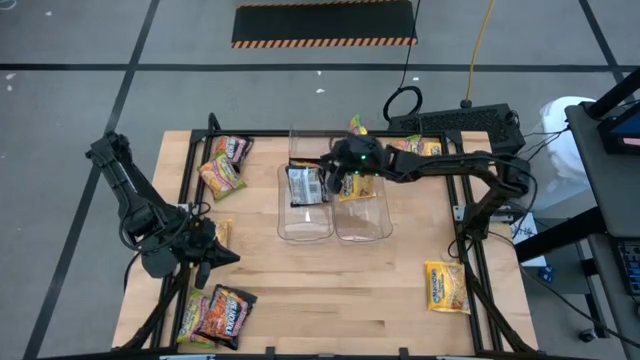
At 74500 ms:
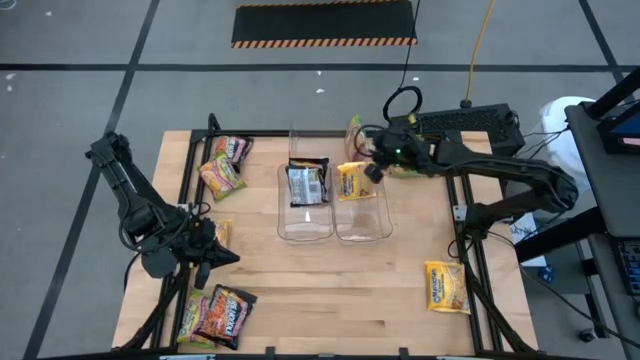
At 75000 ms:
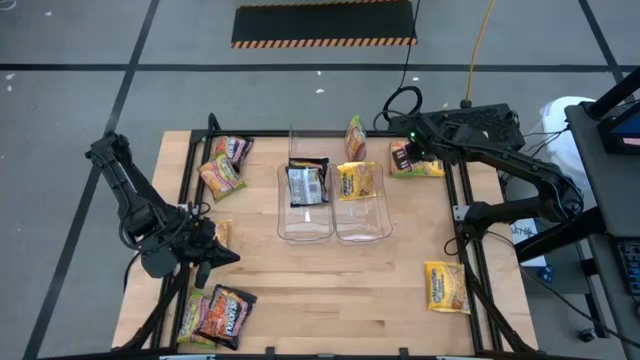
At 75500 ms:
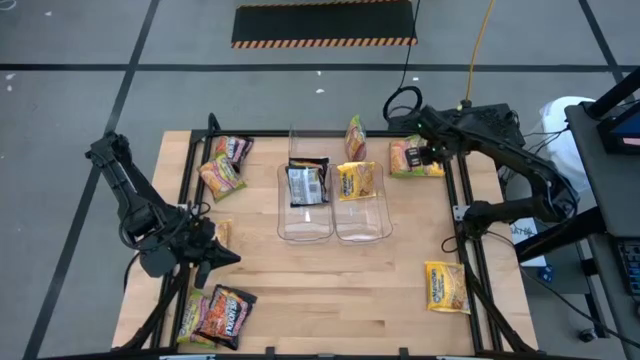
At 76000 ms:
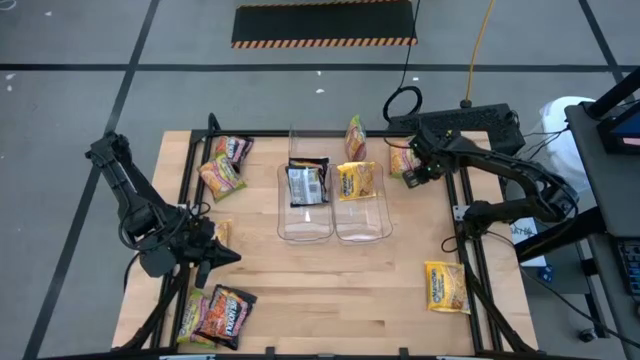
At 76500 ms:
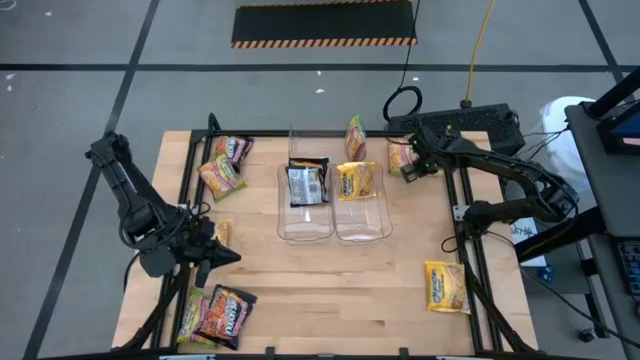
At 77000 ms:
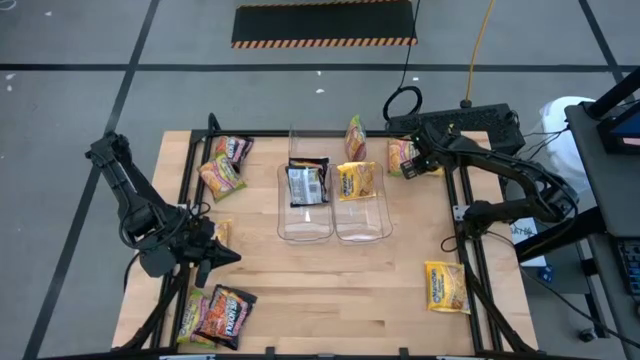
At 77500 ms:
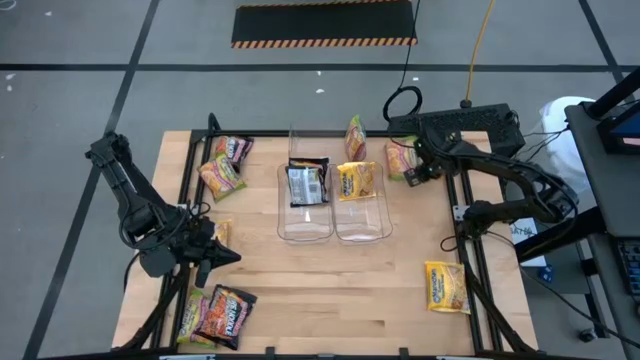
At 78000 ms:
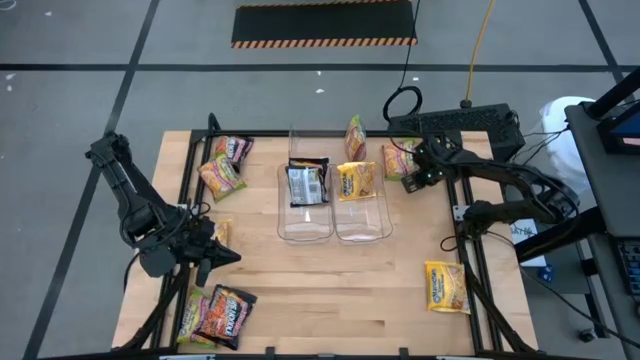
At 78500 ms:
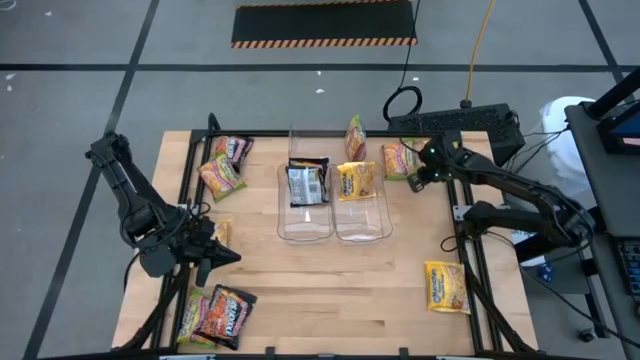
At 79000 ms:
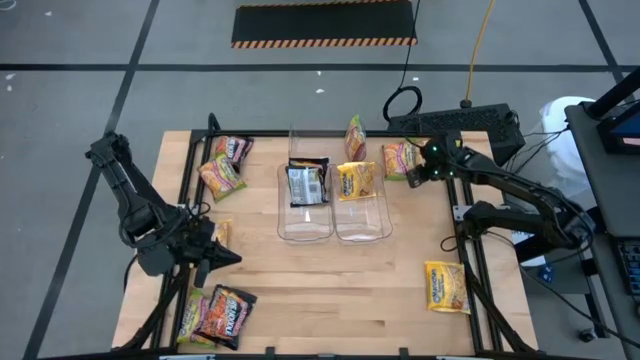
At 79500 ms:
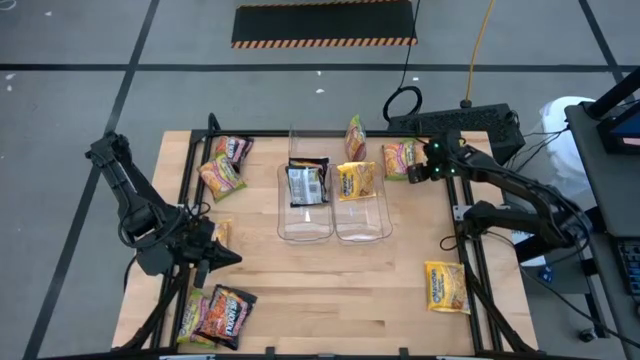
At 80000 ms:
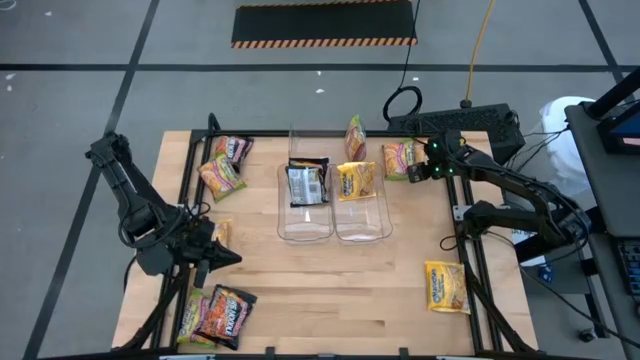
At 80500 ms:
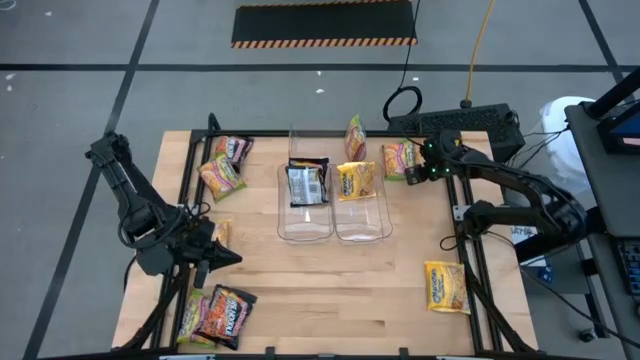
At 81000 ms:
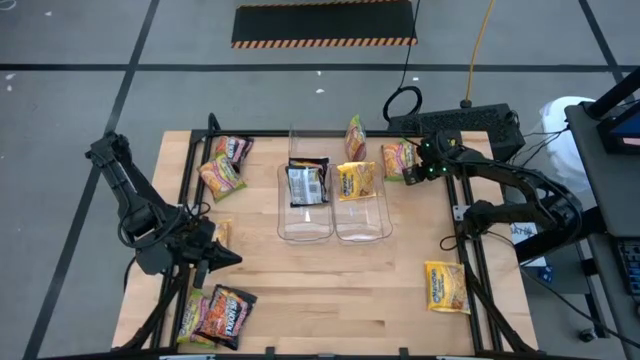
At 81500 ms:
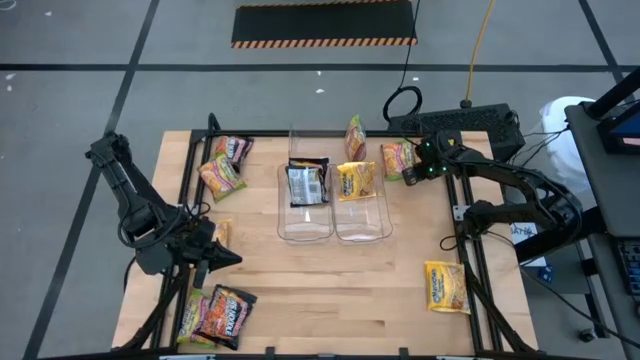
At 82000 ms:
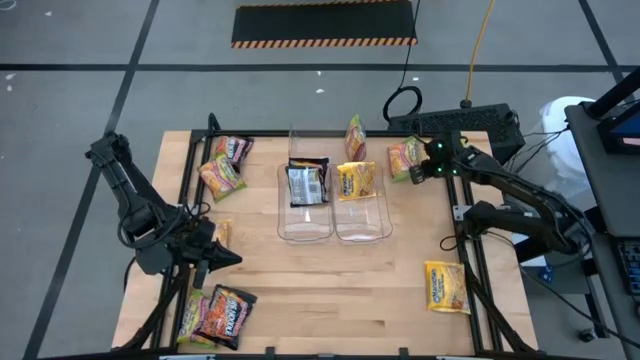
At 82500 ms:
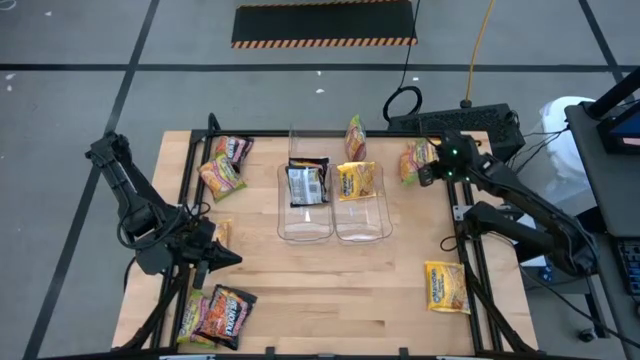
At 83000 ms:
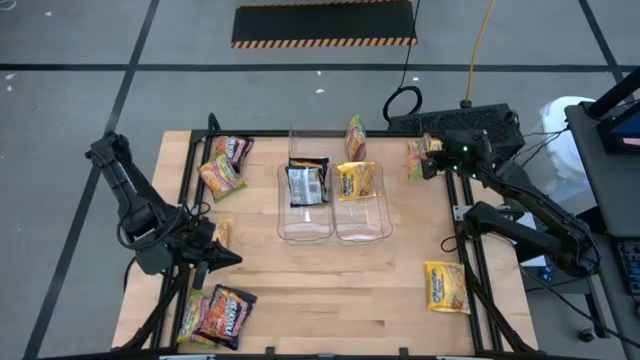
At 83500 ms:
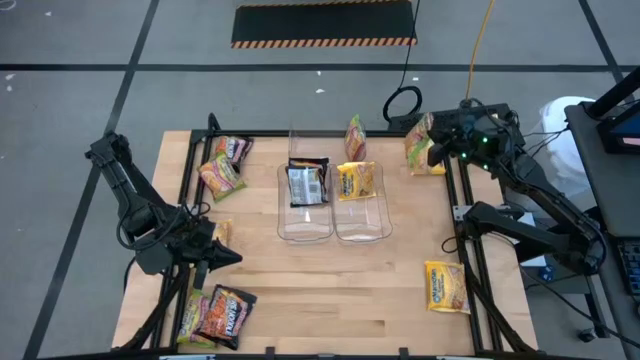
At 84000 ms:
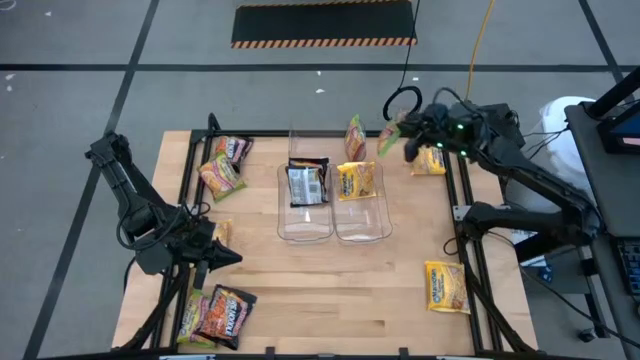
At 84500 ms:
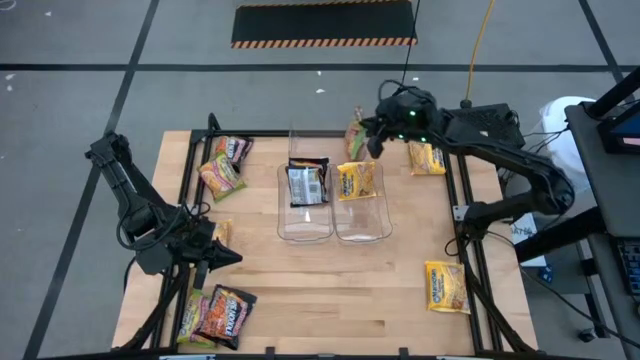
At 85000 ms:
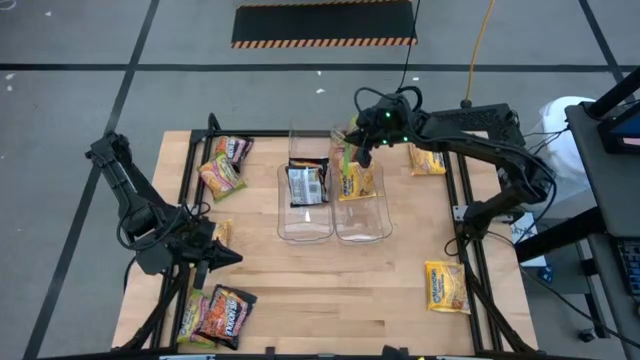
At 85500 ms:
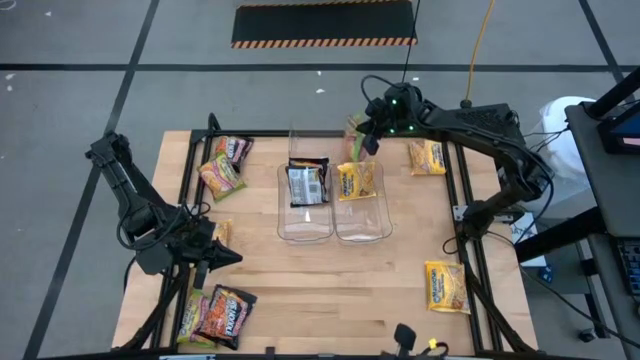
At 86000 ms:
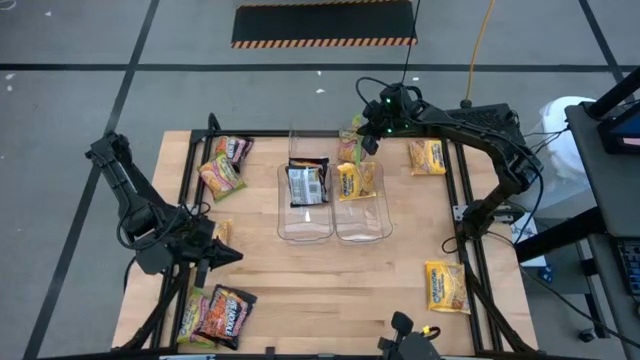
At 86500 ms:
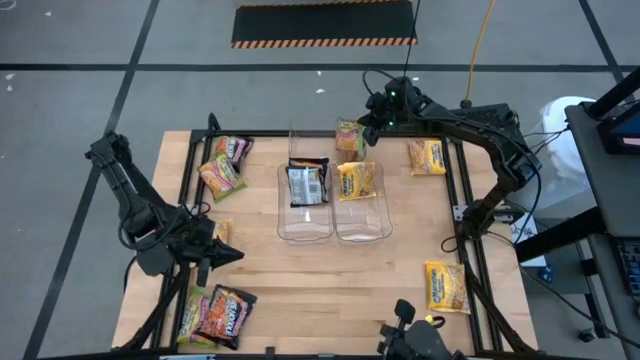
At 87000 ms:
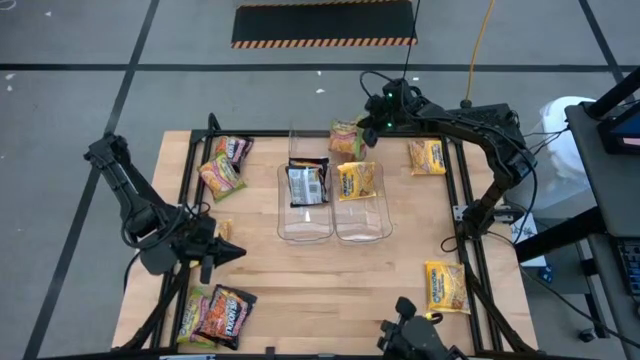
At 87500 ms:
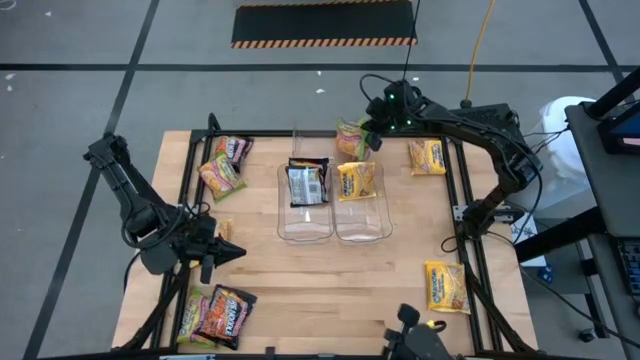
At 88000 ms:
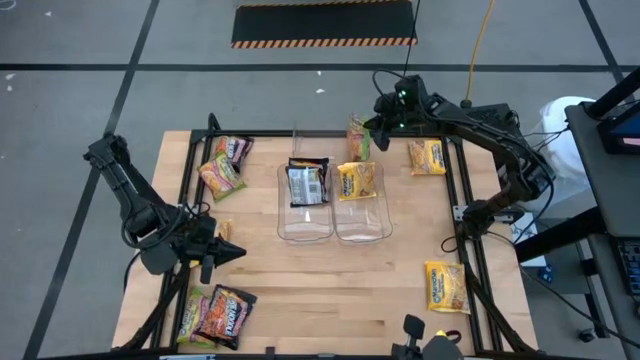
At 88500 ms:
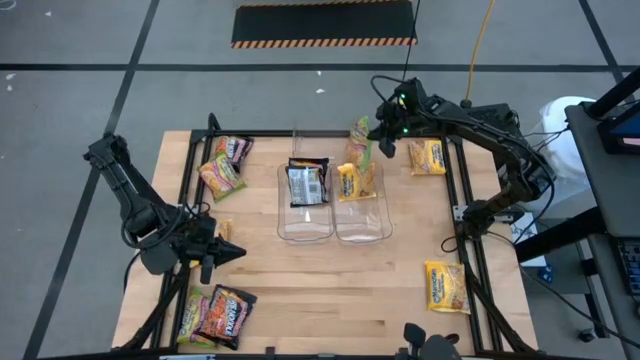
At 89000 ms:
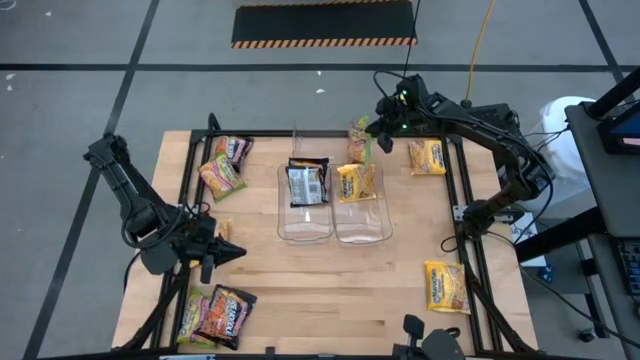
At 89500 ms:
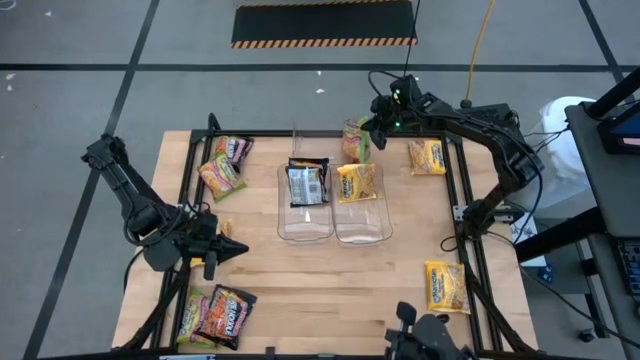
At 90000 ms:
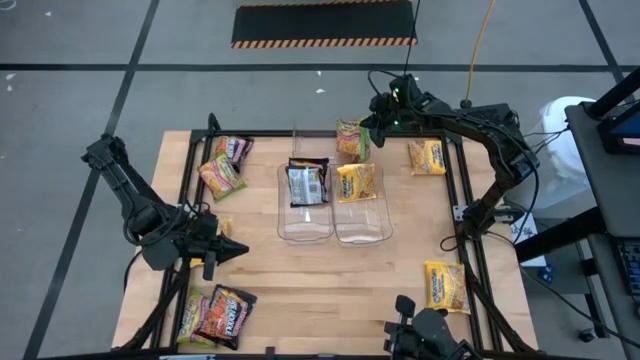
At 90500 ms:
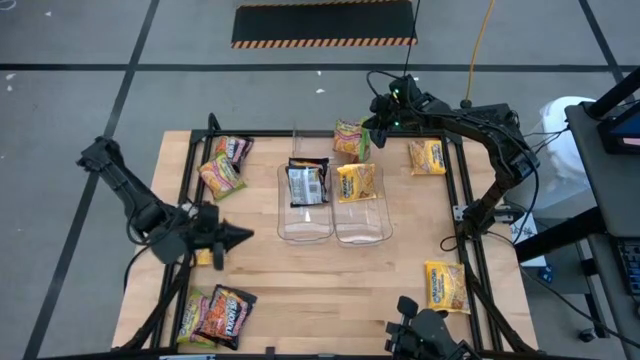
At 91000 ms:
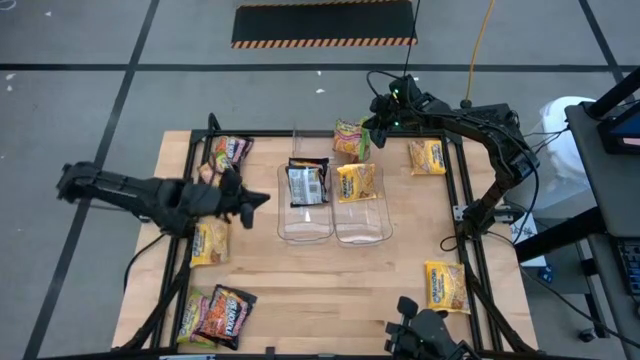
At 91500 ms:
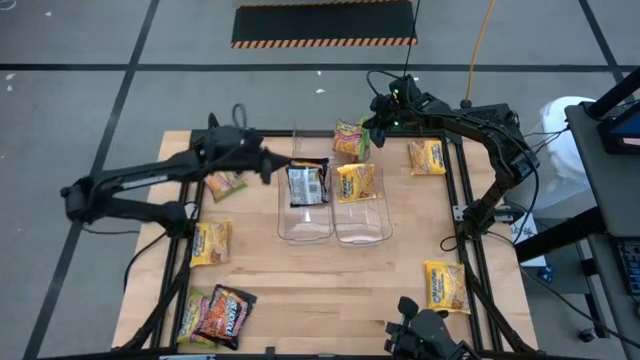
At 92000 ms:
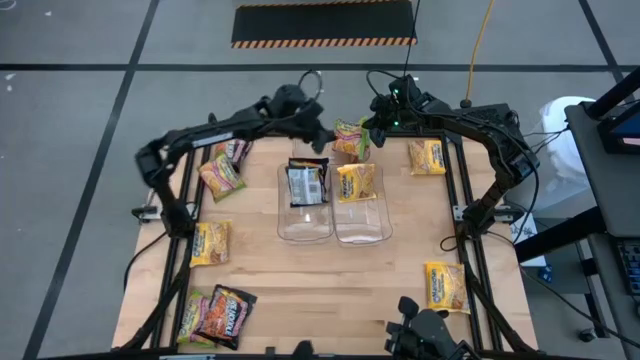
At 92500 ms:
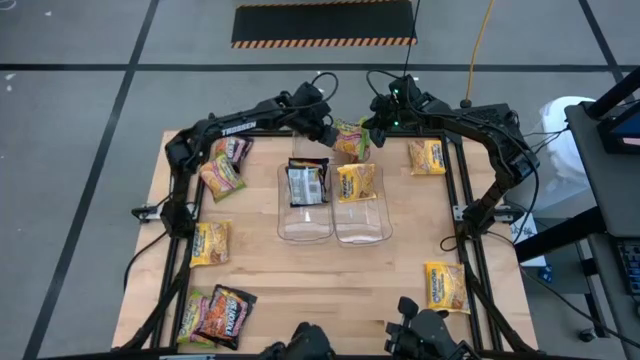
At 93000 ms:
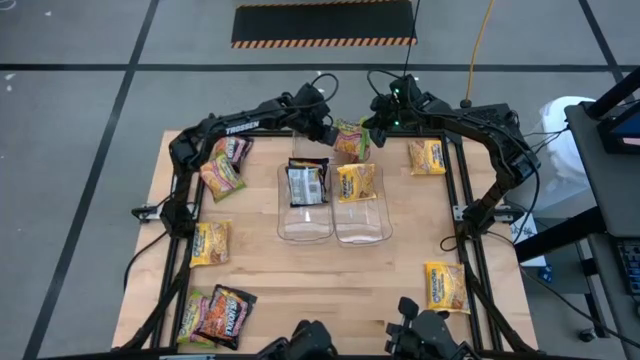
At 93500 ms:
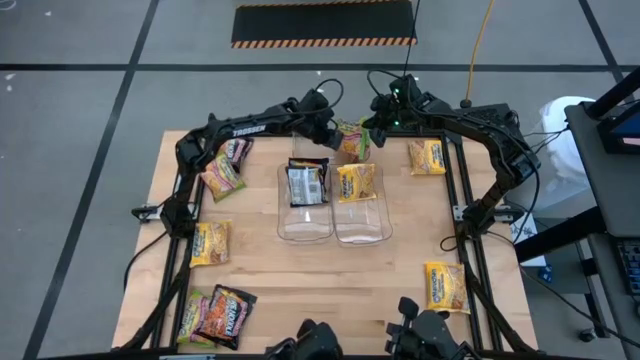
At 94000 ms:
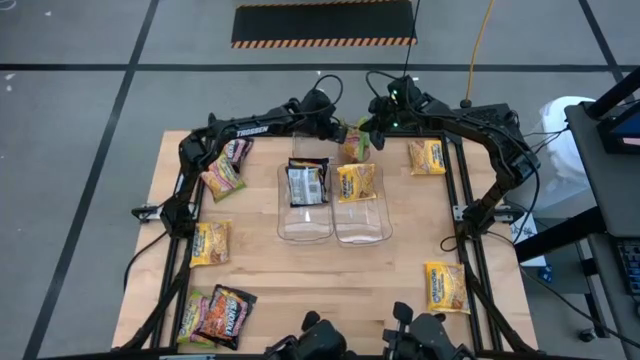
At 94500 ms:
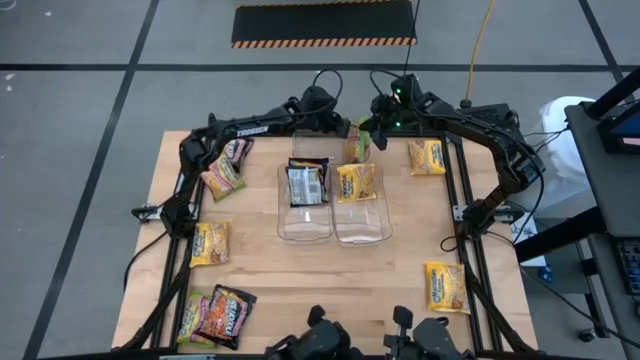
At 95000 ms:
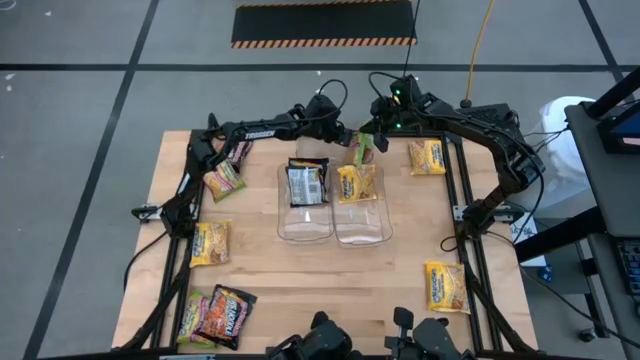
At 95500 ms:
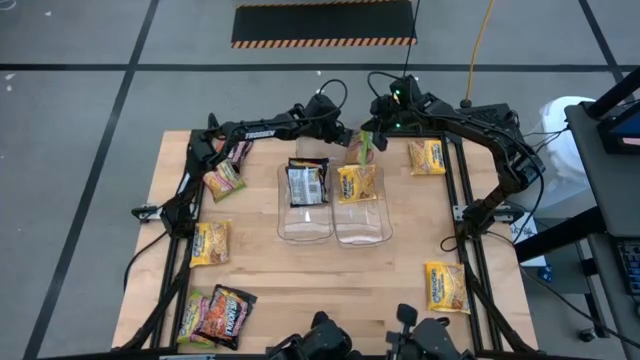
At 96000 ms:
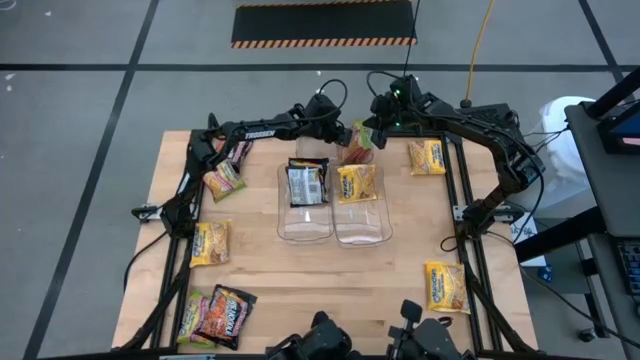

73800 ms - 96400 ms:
Task: Sort Maruchan noodles
Put the green noodle pack into the top transparent bin
